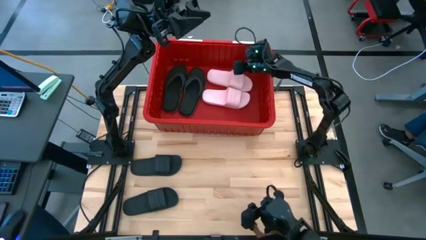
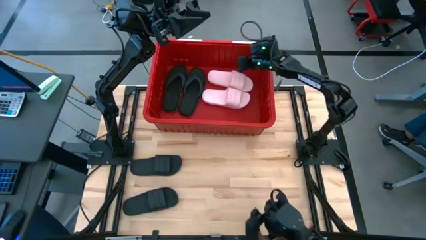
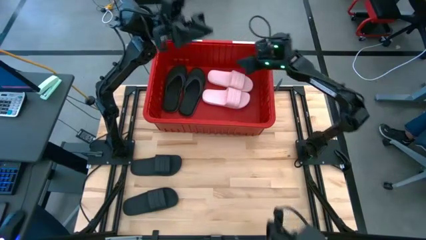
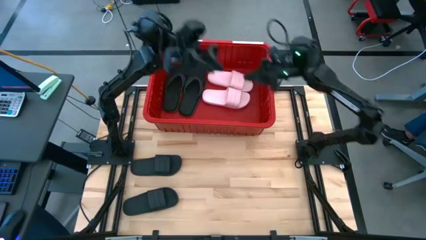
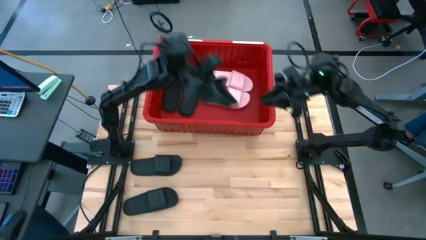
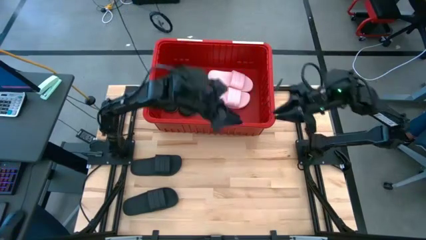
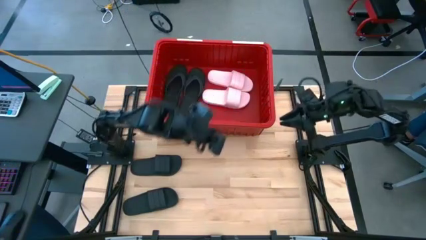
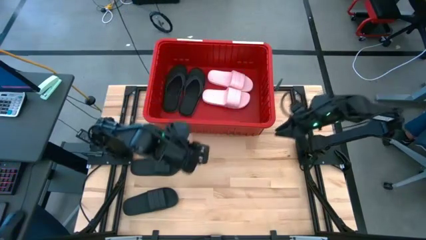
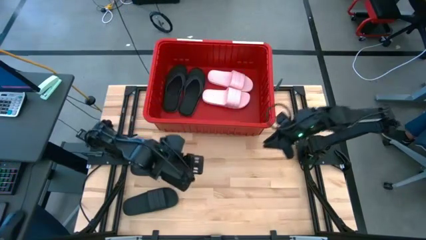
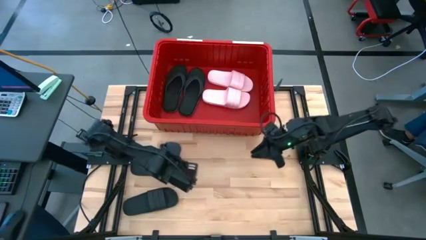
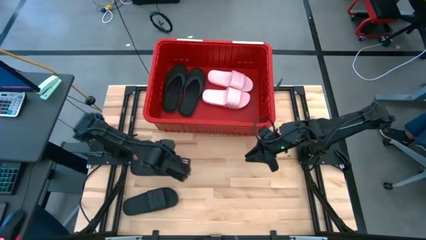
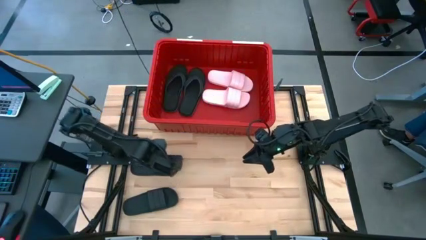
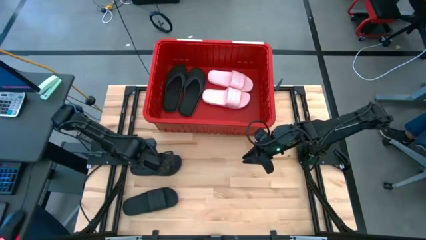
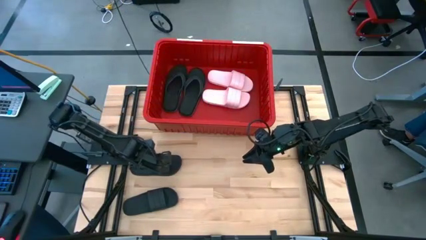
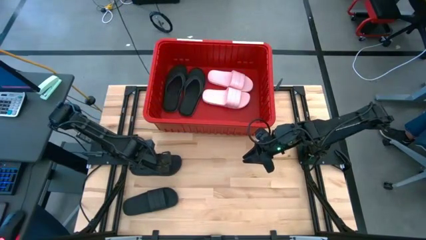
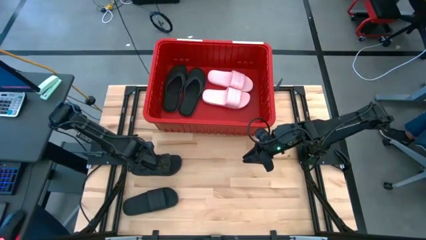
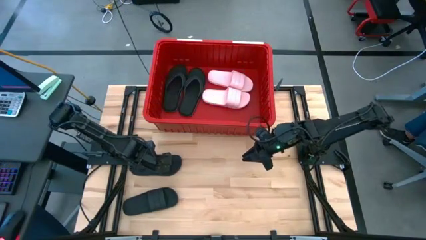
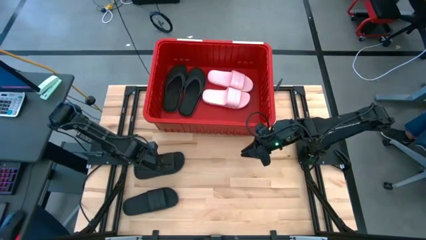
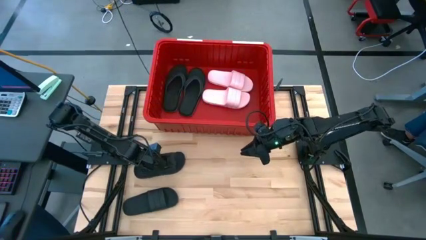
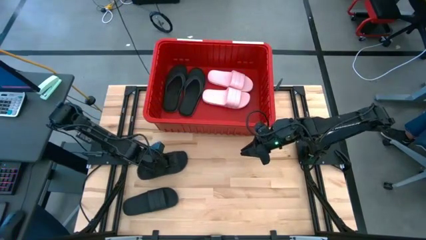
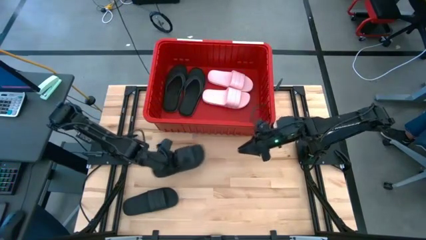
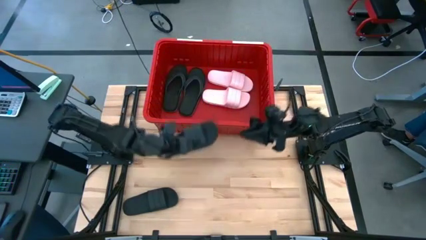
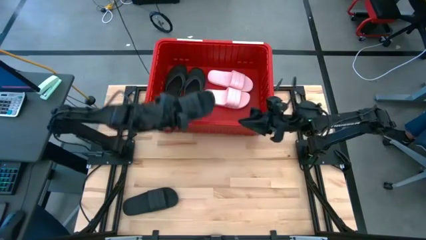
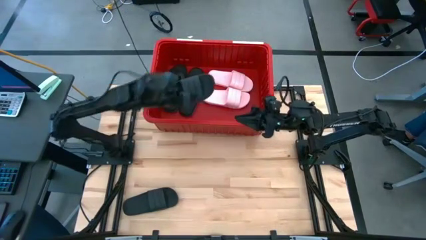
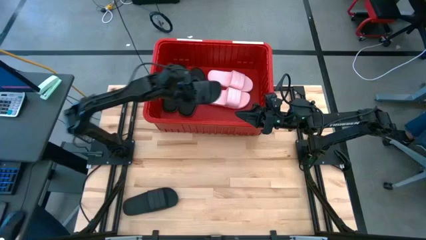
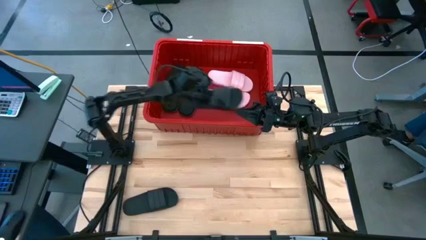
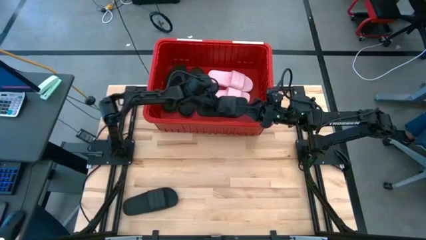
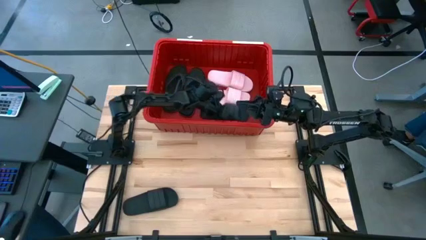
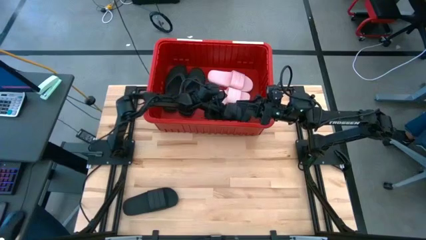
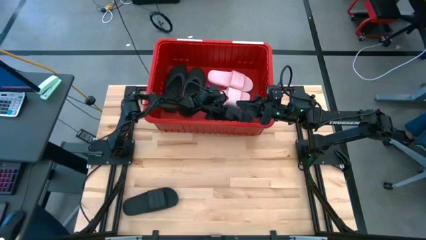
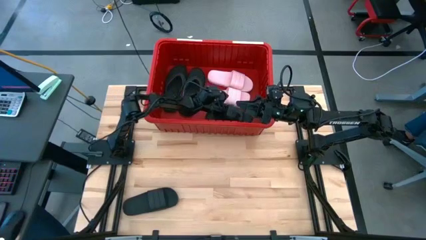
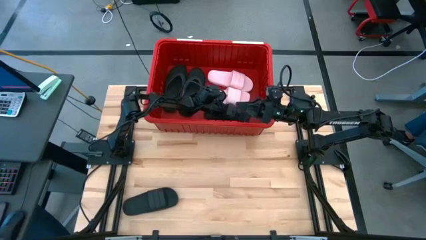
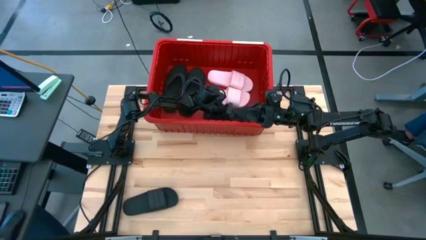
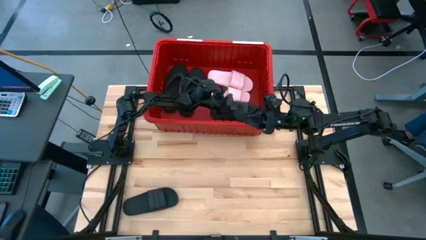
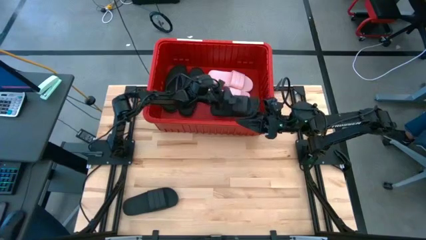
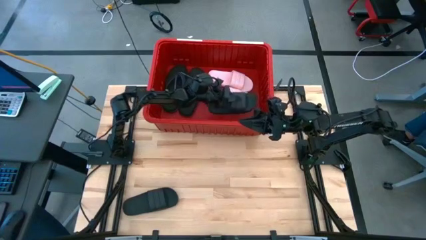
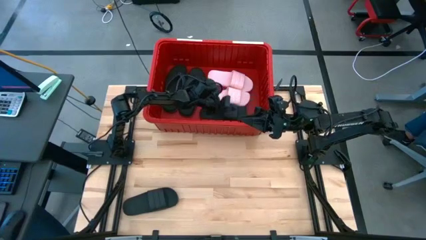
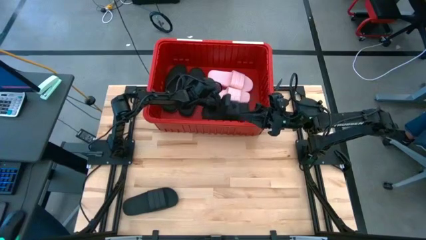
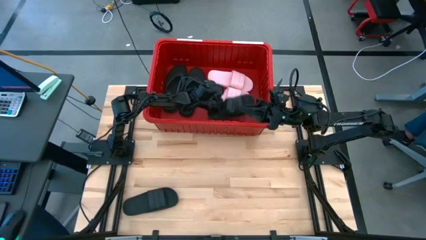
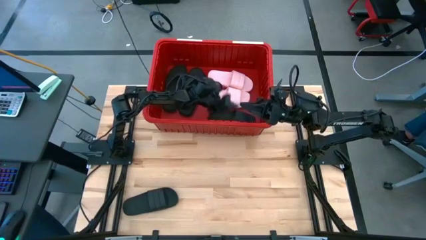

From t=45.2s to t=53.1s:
Task: Pick and place slides into bin
Put the top black slide into the red bin

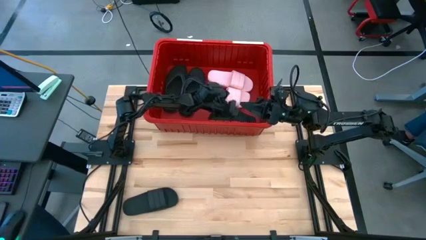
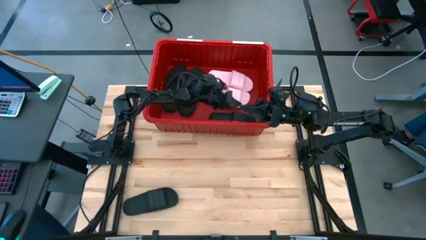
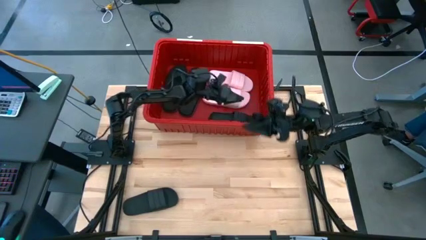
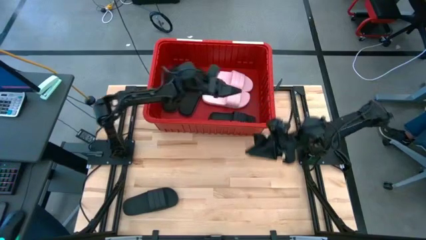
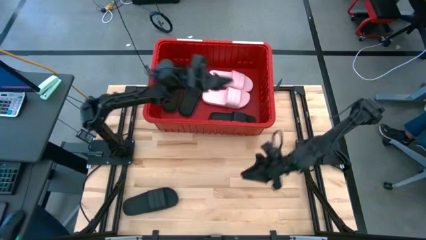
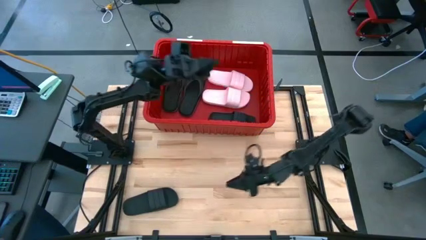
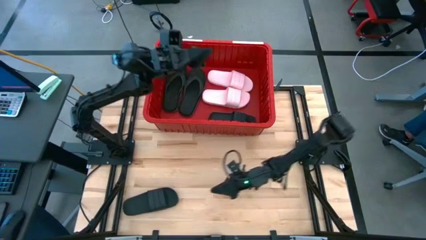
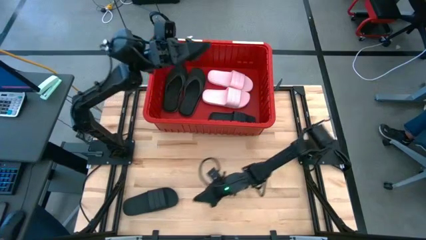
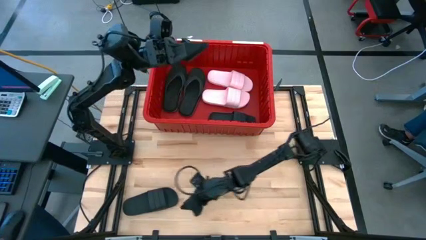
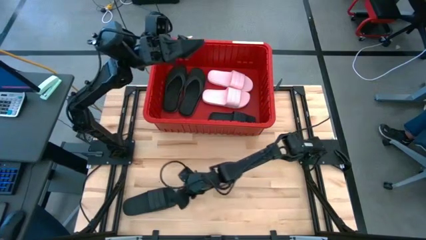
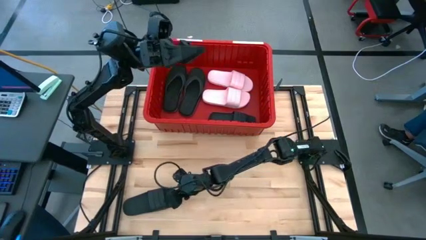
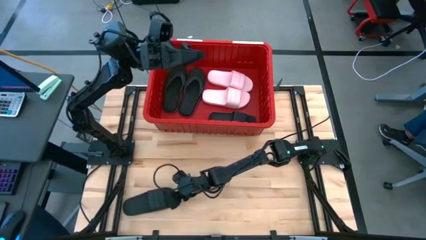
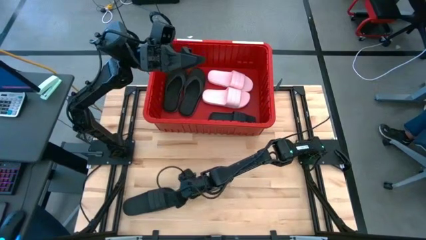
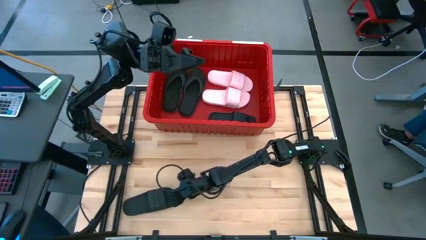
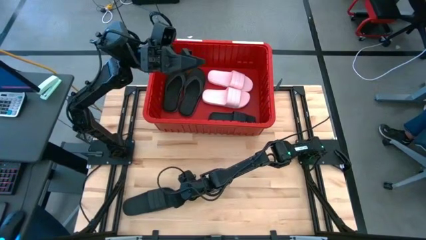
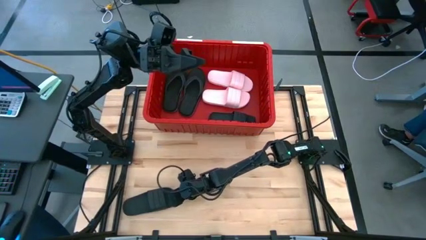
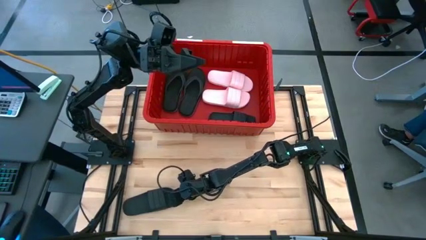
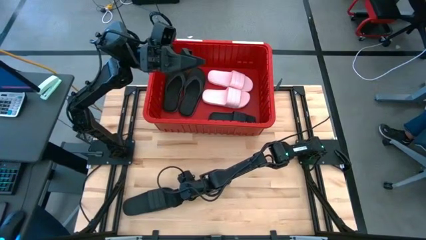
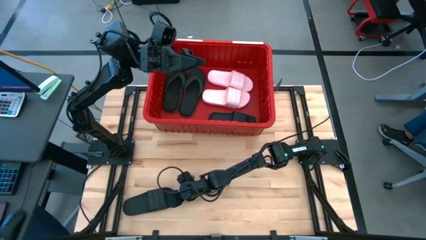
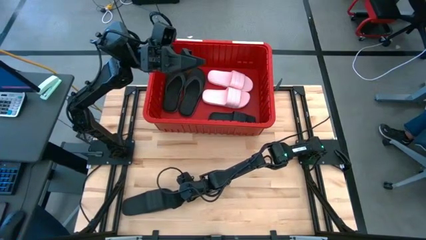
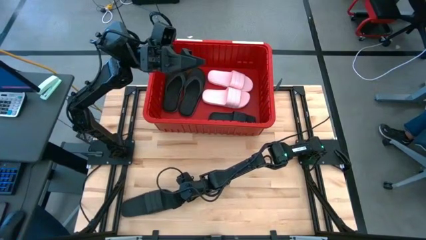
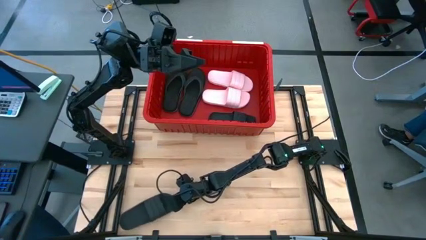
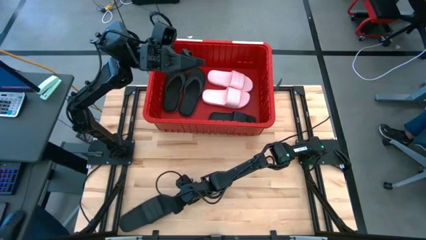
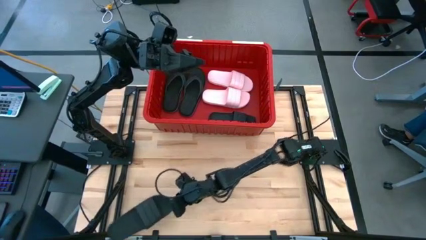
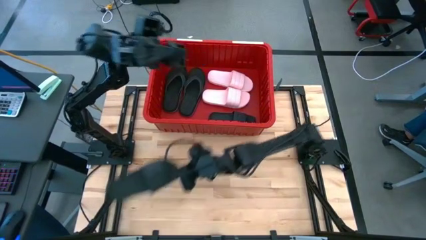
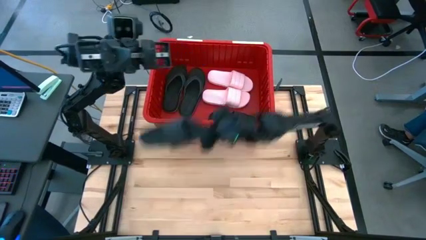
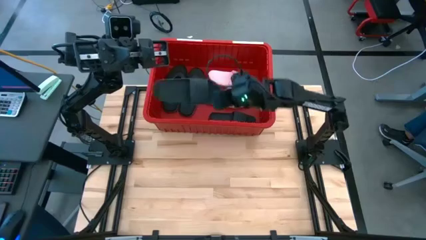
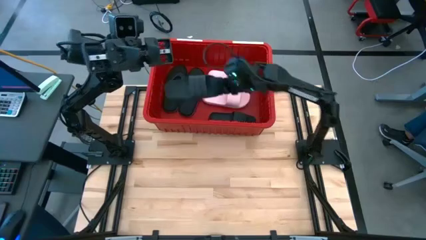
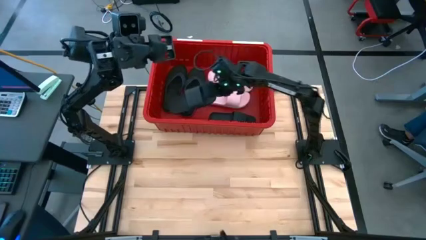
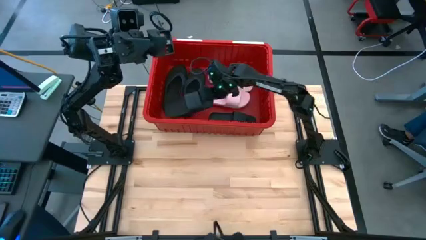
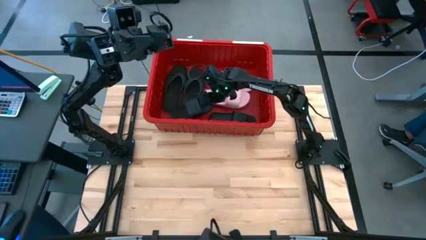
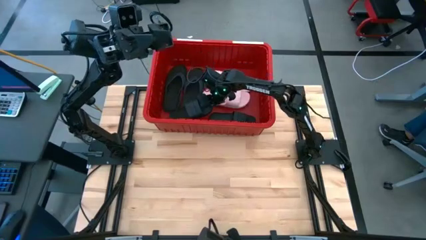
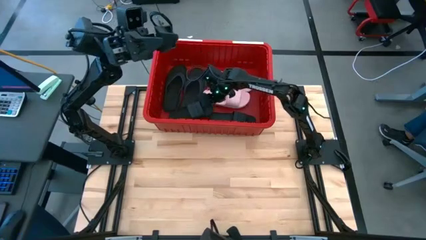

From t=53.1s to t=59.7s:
Put the black slide into the red bin
